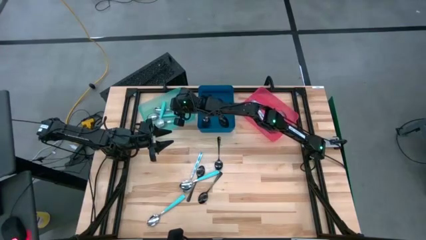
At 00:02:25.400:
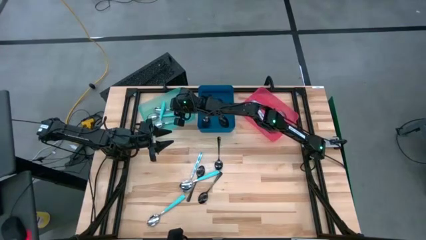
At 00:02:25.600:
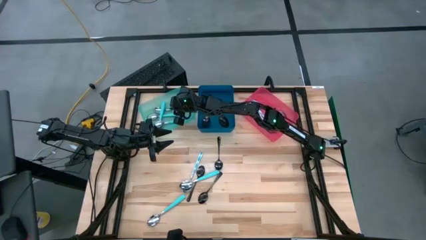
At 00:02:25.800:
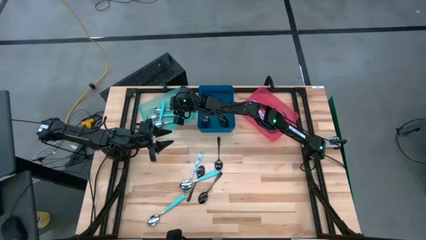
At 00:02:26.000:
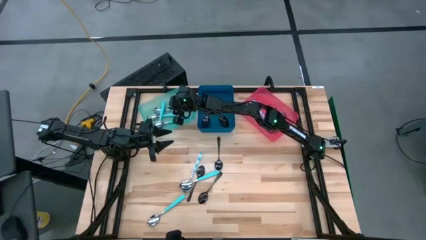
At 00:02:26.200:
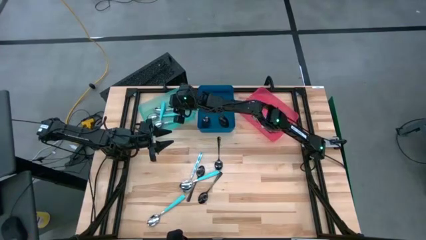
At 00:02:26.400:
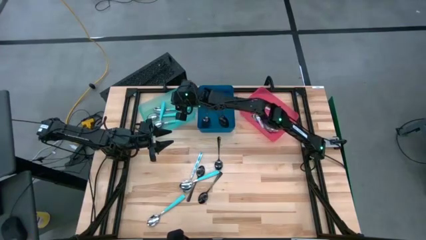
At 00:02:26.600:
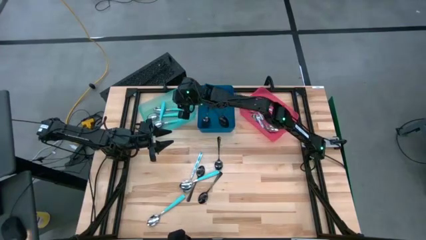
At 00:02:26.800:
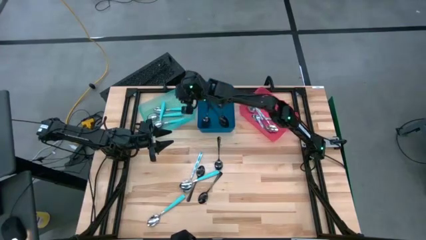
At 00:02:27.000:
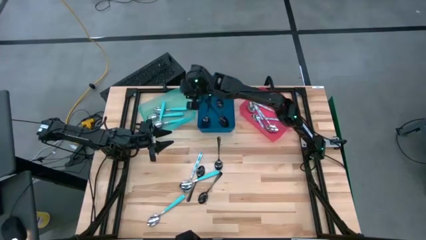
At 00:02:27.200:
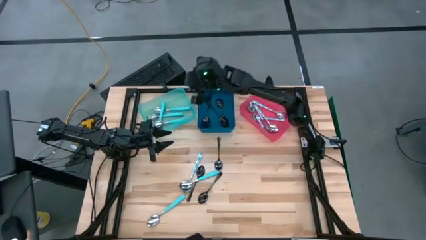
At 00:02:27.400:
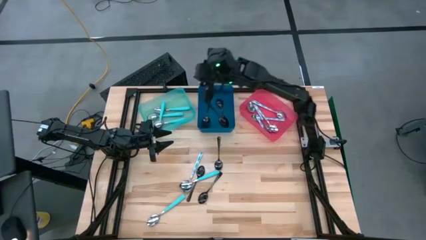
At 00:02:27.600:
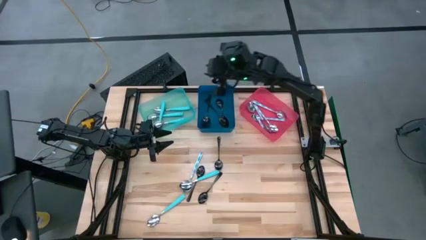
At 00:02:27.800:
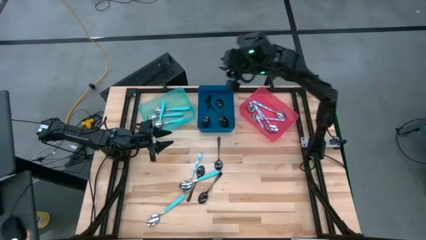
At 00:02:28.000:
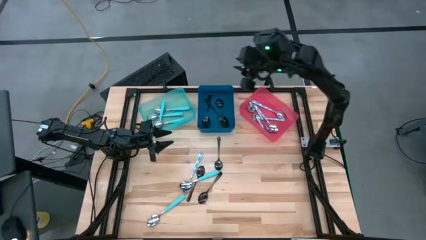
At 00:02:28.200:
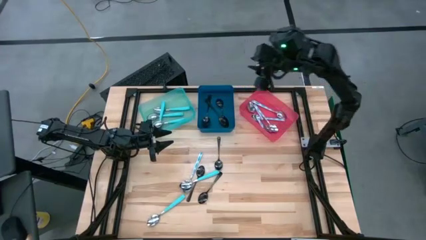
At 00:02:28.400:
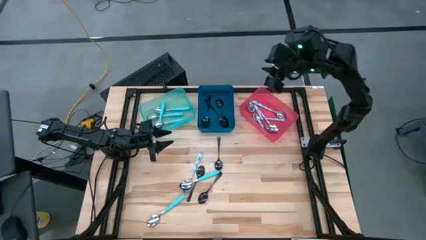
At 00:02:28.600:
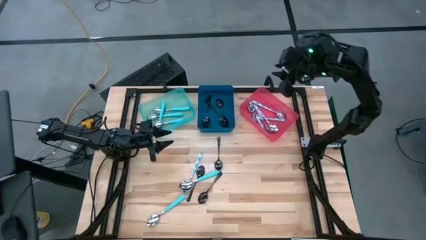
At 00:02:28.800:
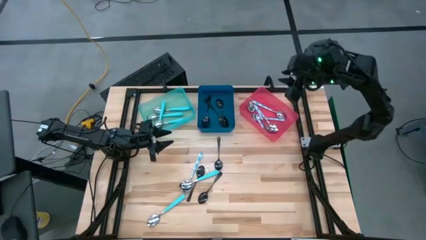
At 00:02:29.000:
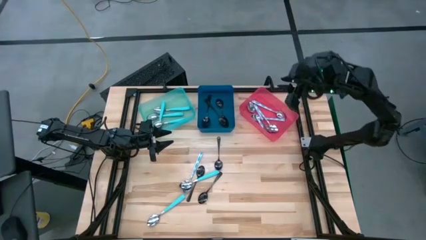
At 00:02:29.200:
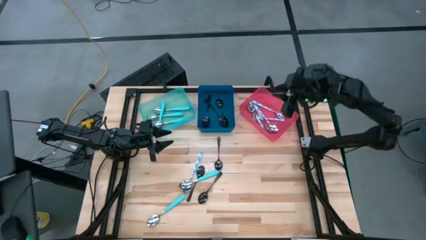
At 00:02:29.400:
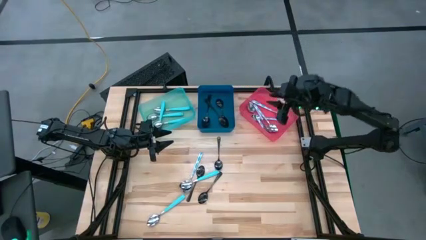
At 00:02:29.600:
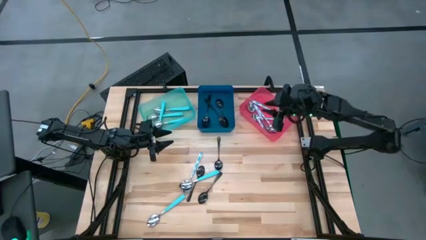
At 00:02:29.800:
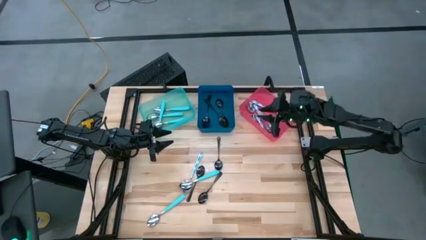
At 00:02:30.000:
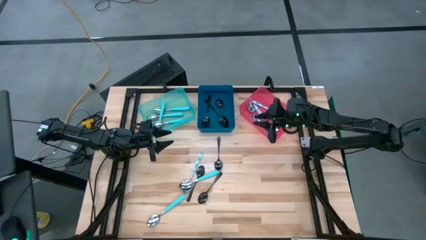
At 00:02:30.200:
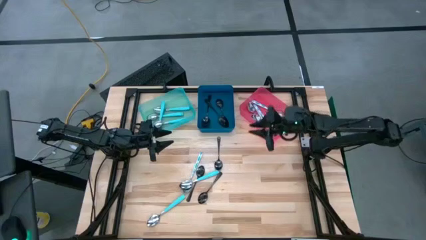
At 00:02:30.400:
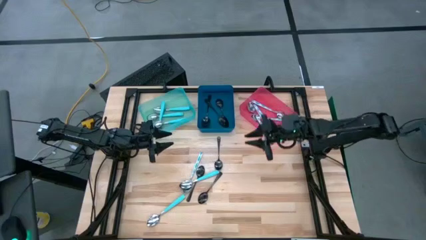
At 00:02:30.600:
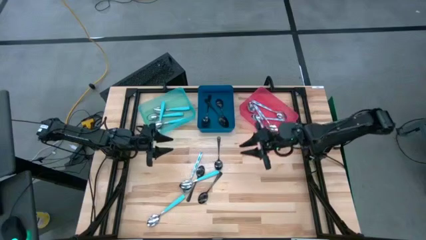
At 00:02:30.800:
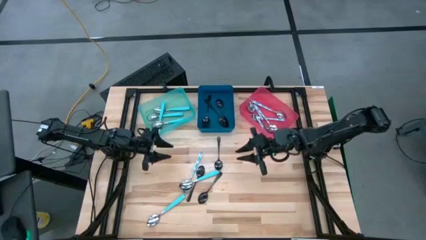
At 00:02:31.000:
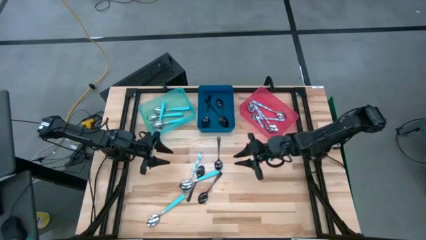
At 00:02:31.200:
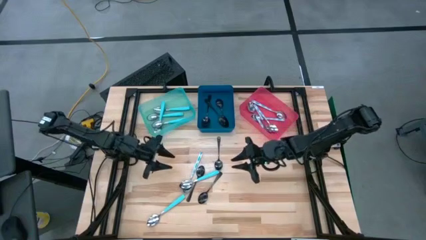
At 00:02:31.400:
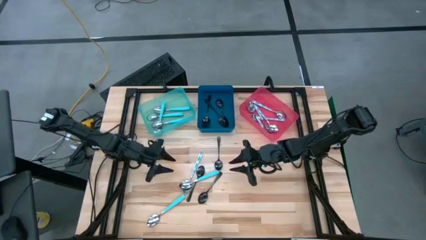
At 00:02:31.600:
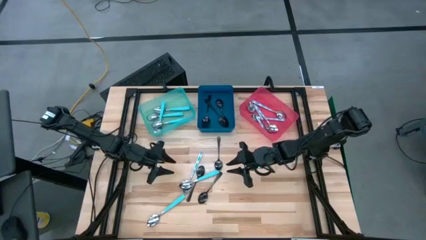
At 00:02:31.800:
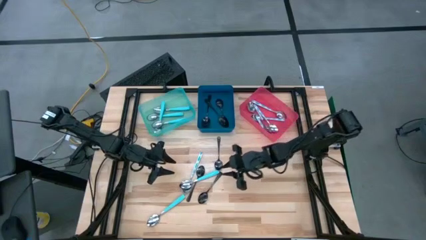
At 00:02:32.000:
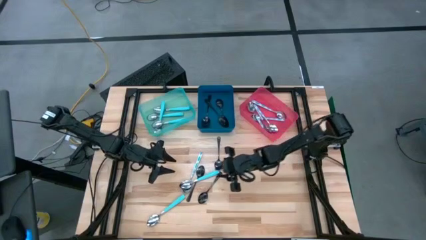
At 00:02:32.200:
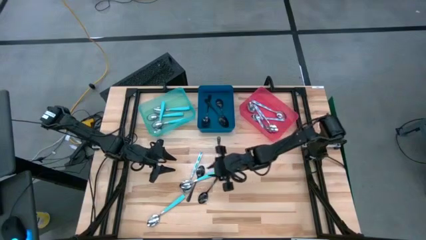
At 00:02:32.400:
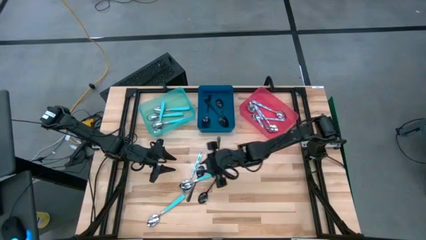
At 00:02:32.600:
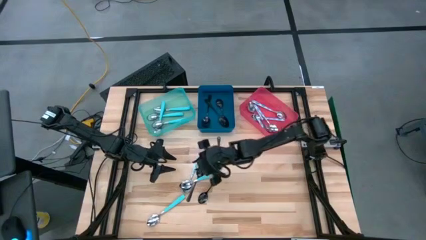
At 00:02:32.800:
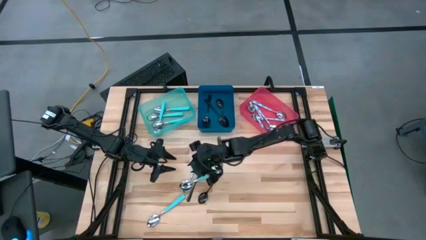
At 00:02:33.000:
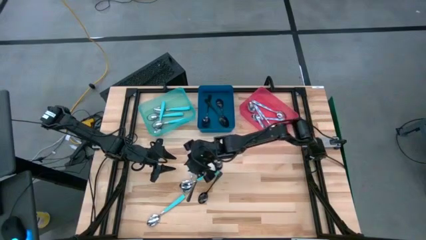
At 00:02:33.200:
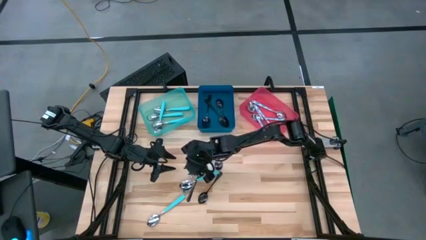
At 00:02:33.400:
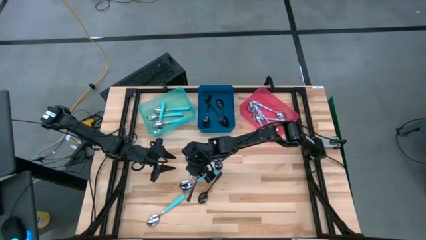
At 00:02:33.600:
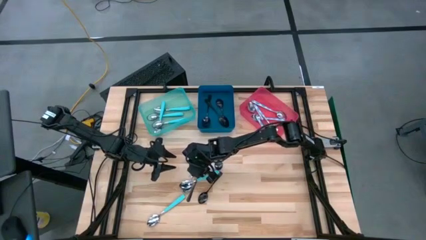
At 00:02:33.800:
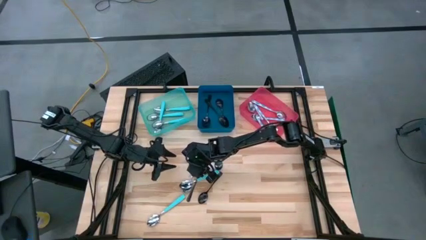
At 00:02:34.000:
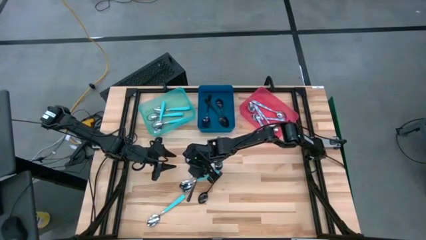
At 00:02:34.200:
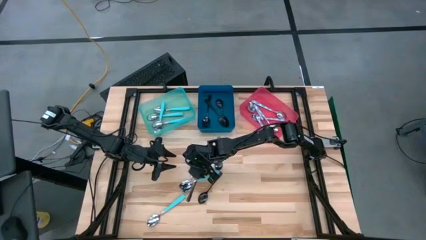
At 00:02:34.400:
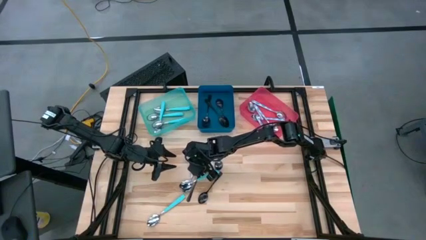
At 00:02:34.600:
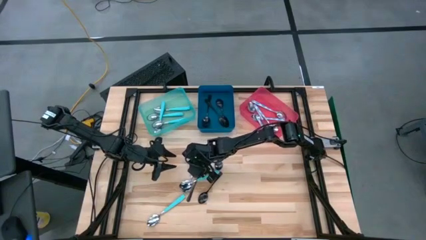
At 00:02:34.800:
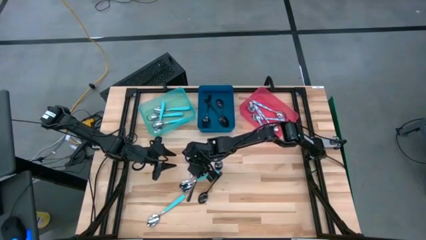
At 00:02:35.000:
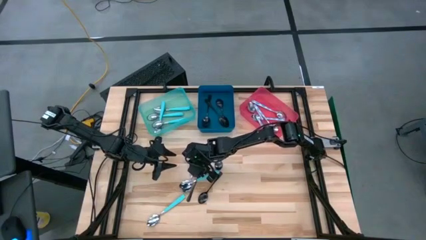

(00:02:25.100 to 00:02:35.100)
Task: Sort silverware by color (type)
Put the white patterned spoon into the pink bin
